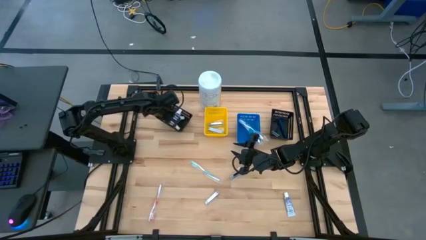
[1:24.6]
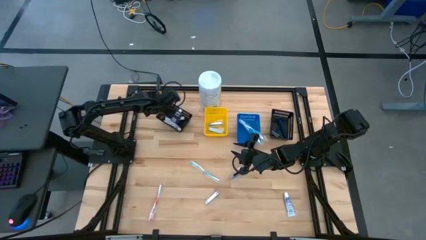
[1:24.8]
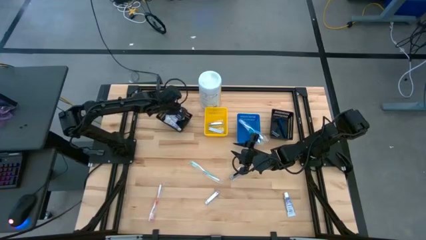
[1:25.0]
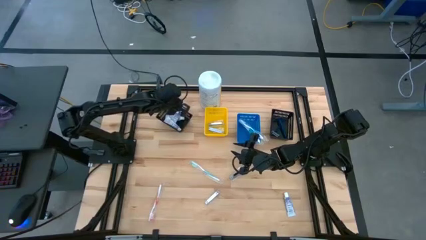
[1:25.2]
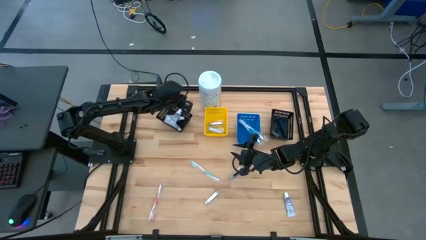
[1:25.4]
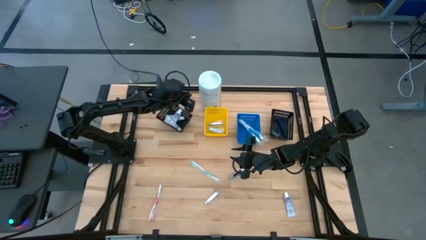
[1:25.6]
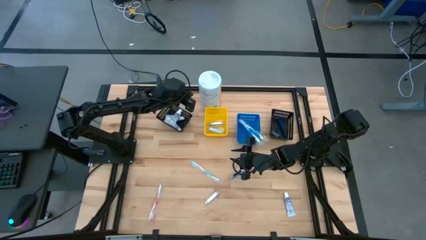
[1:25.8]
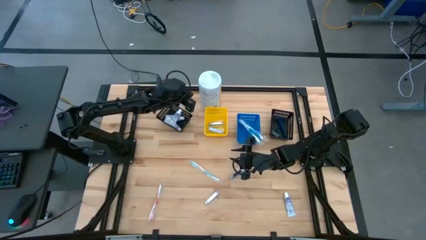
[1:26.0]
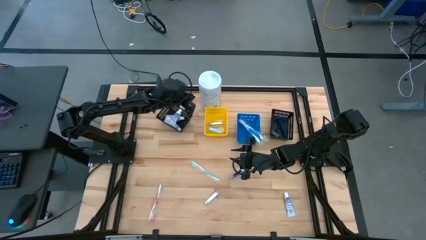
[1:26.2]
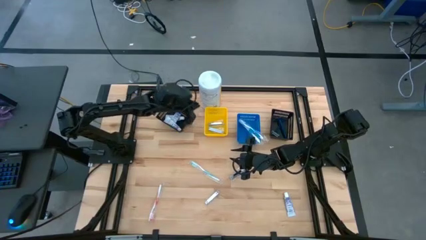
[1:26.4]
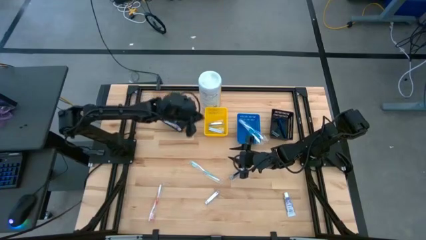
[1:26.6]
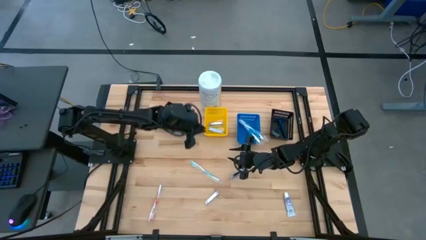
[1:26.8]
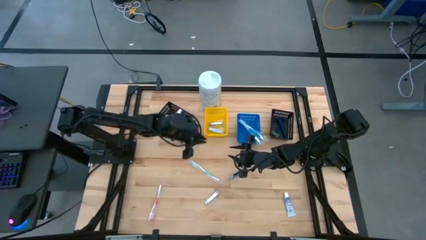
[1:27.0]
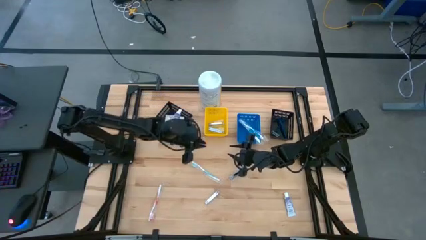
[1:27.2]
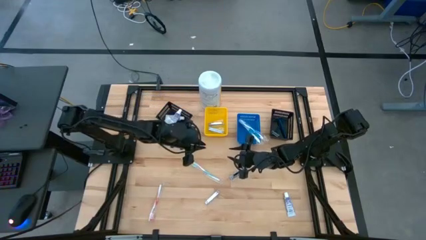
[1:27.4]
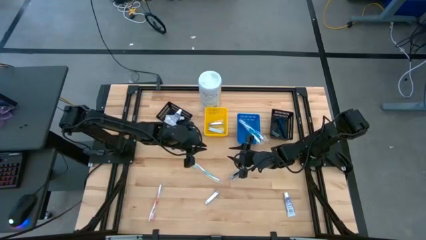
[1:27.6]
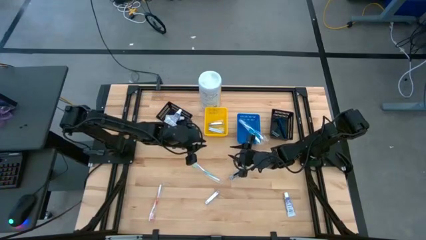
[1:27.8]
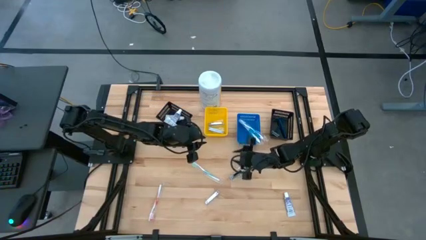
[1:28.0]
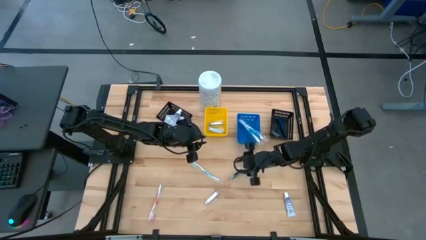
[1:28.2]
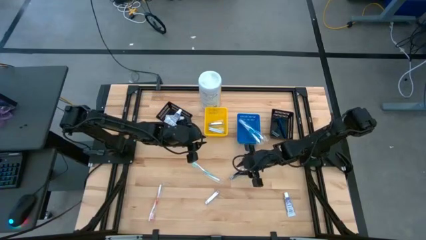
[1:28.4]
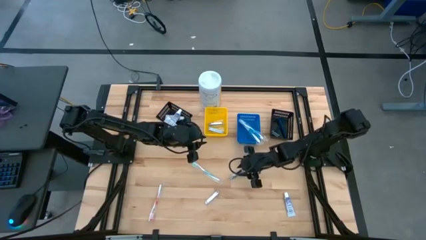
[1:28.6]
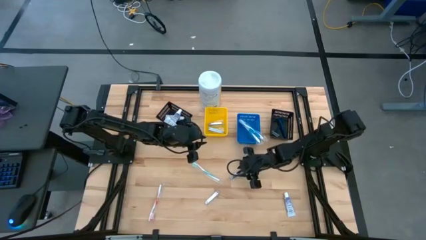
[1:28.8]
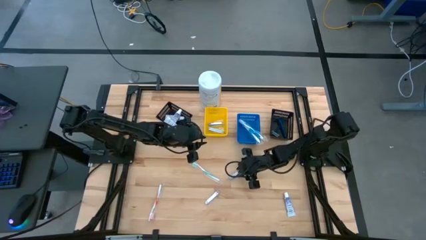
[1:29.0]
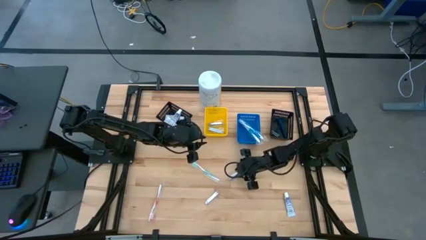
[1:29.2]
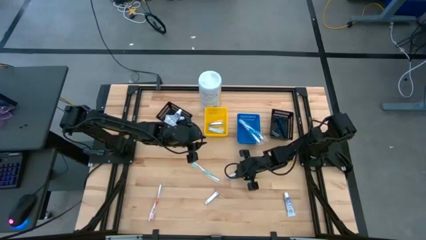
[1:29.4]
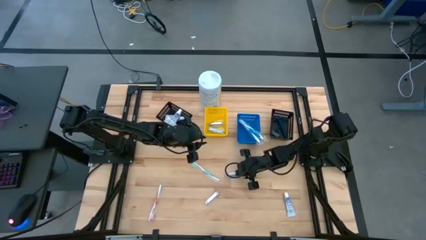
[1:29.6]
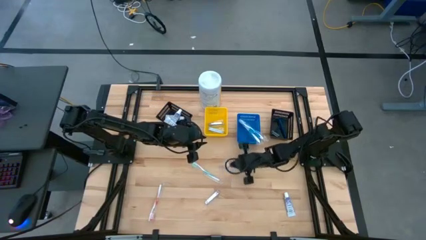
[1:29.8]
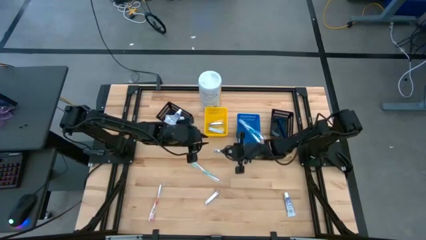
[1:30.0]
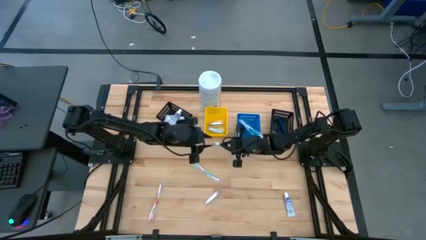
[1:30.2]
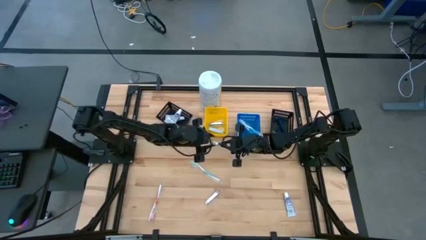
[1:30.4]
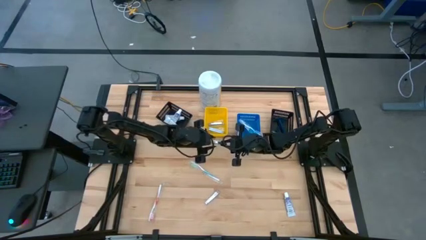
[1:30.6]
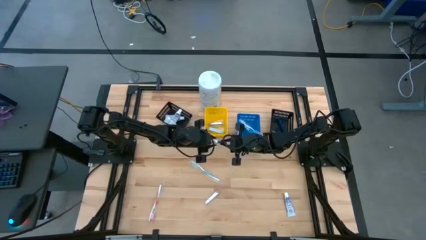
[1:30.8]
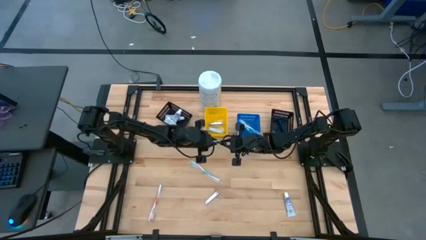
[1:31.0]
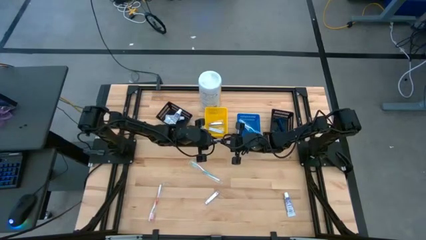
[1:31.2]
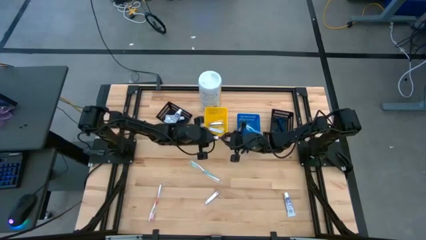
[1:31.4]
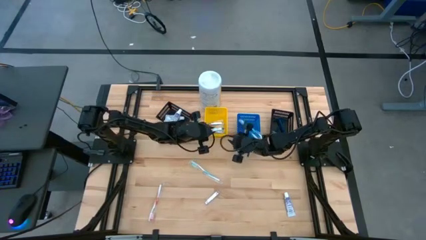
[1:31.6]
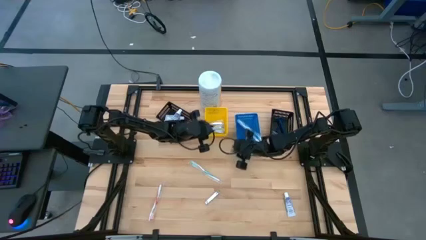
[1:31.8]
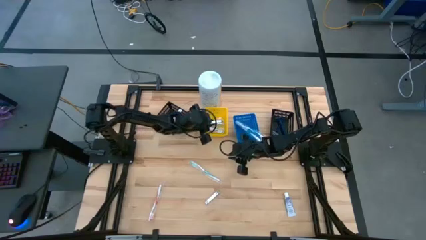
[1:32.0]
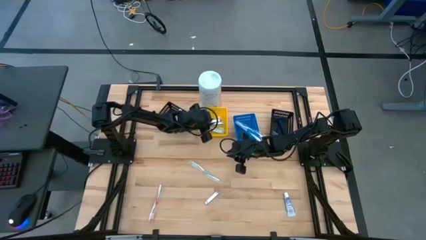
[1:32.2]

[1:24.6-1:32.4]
Task: Pick & Place Travel size toiletries
Put the silver nail cutter into the yellow bin

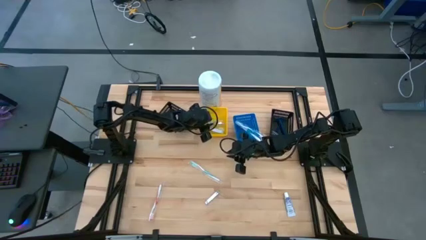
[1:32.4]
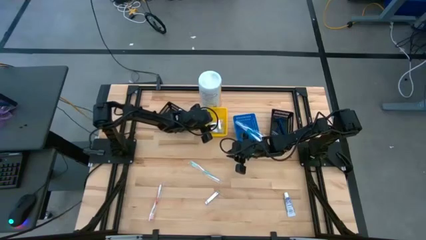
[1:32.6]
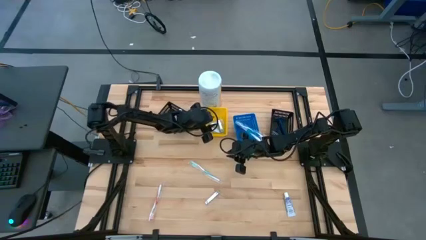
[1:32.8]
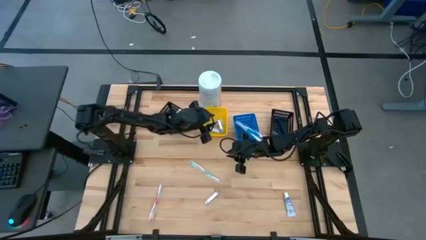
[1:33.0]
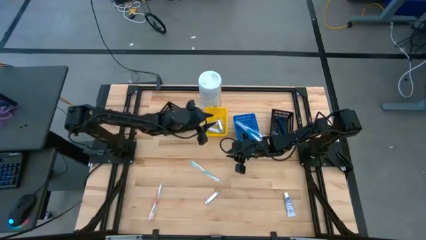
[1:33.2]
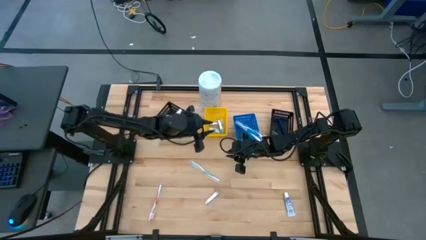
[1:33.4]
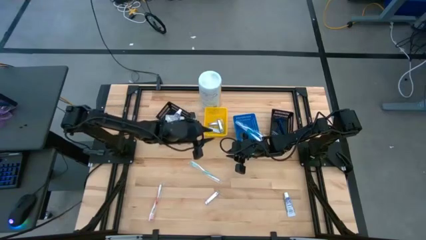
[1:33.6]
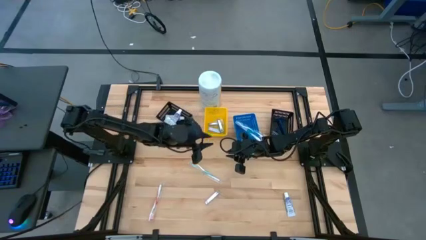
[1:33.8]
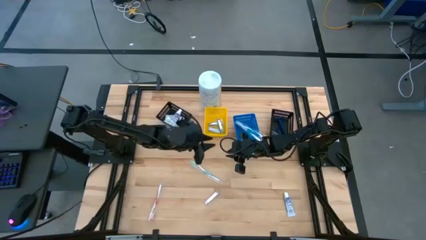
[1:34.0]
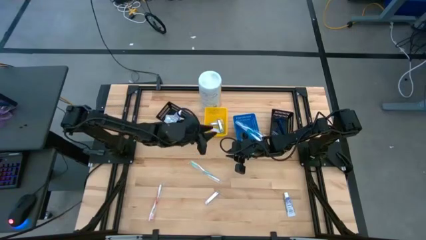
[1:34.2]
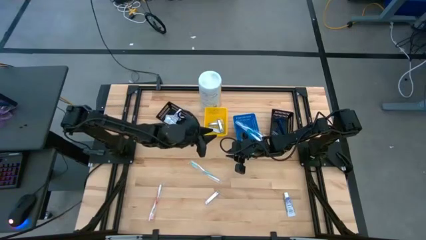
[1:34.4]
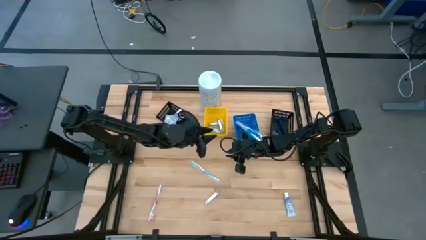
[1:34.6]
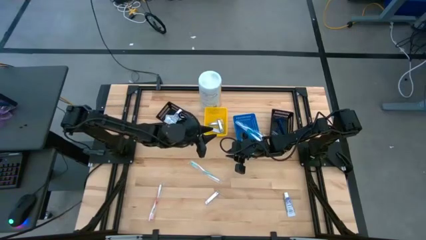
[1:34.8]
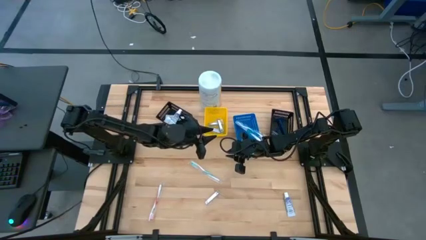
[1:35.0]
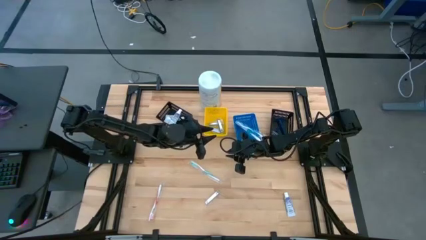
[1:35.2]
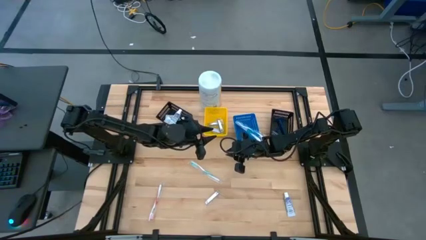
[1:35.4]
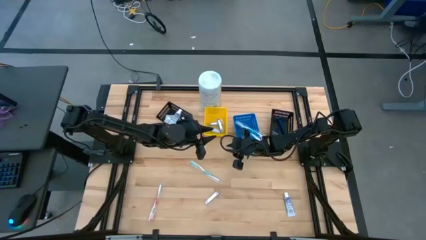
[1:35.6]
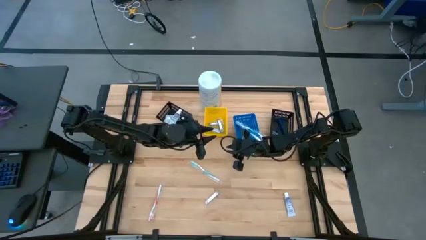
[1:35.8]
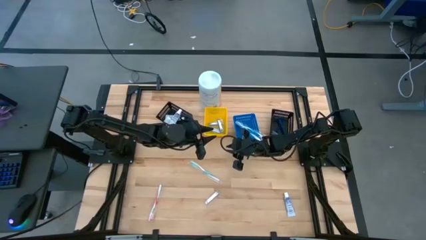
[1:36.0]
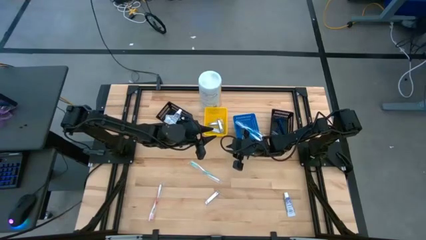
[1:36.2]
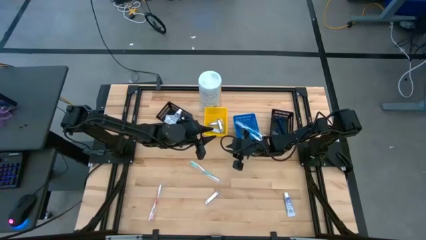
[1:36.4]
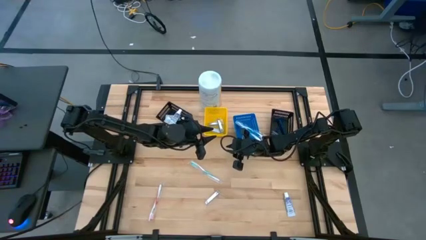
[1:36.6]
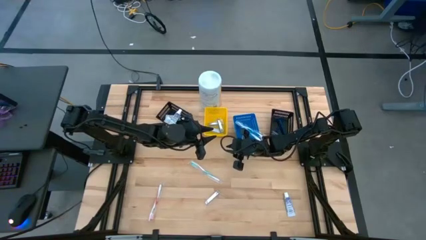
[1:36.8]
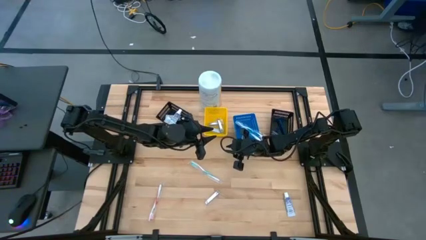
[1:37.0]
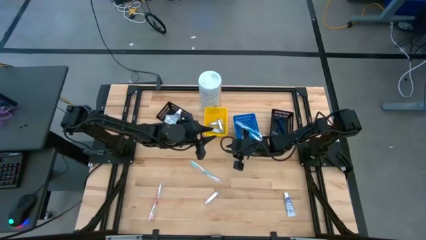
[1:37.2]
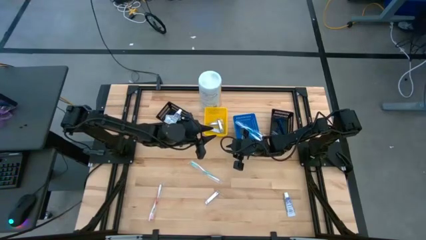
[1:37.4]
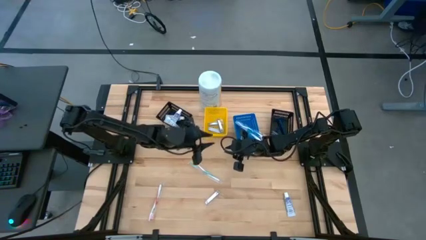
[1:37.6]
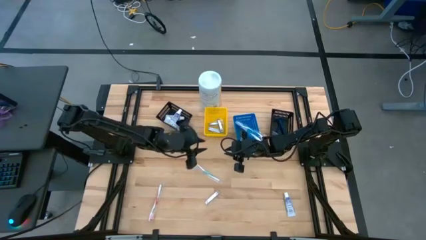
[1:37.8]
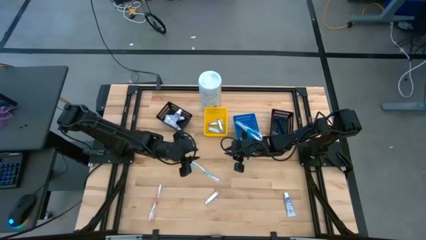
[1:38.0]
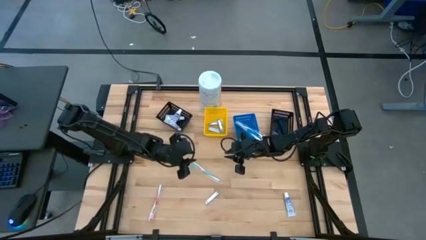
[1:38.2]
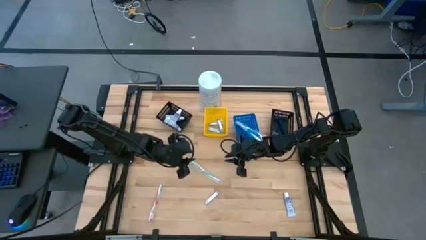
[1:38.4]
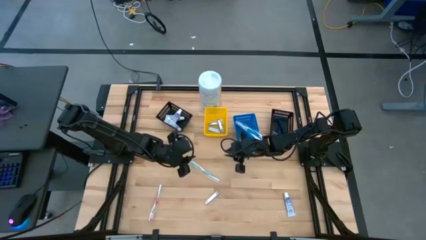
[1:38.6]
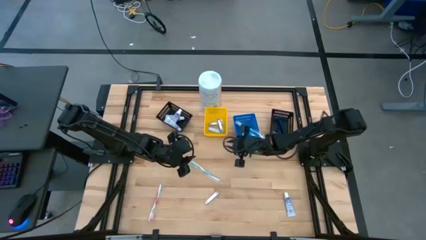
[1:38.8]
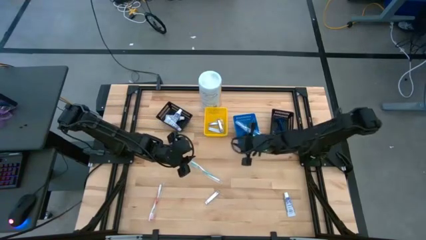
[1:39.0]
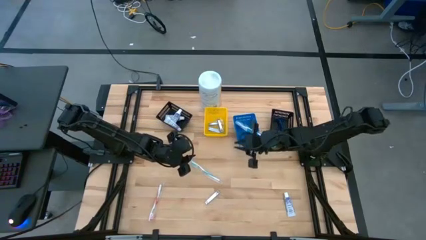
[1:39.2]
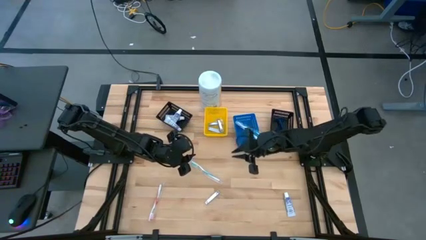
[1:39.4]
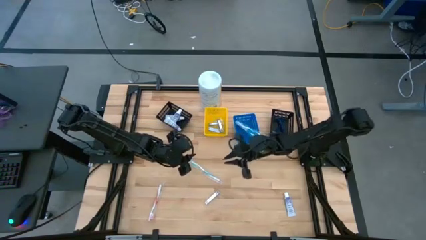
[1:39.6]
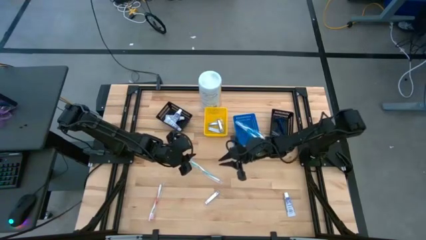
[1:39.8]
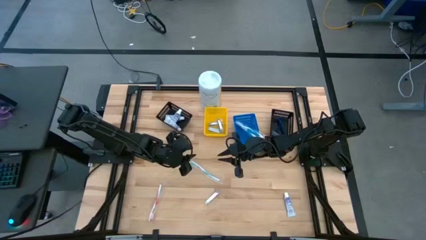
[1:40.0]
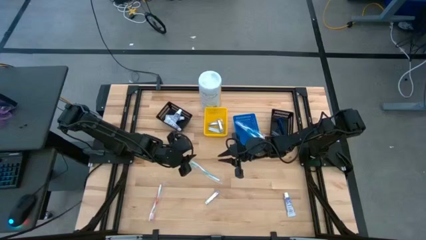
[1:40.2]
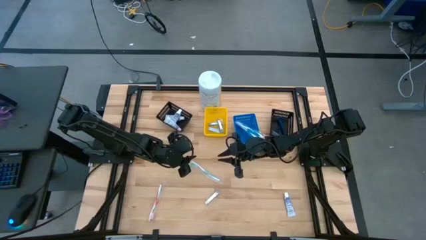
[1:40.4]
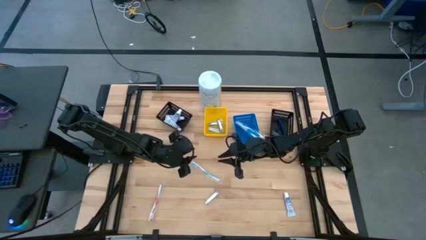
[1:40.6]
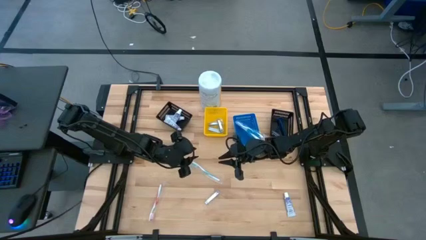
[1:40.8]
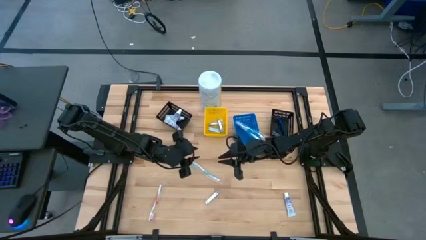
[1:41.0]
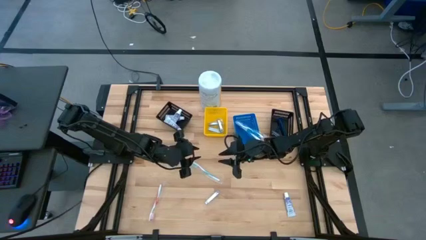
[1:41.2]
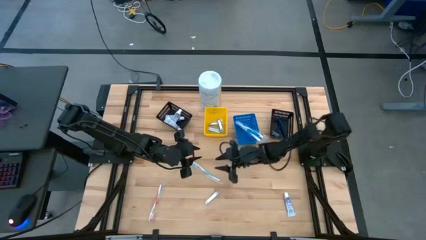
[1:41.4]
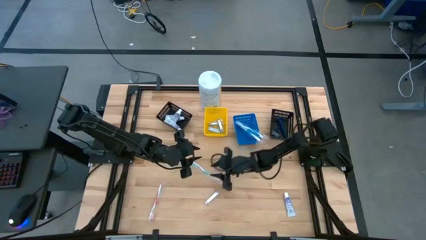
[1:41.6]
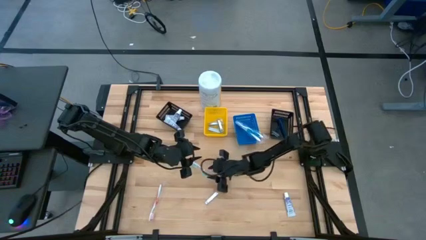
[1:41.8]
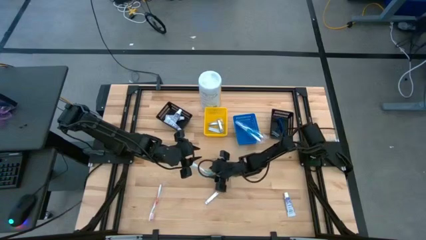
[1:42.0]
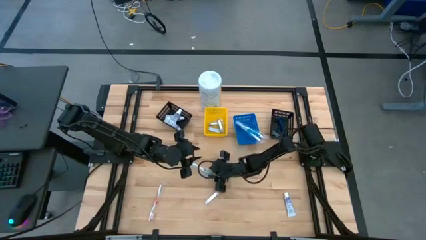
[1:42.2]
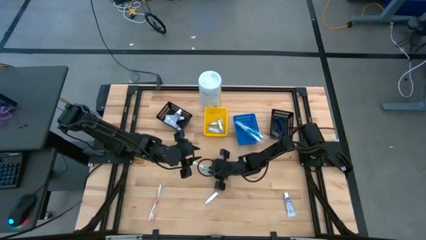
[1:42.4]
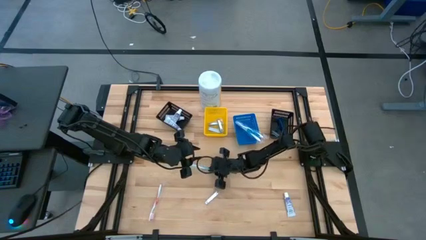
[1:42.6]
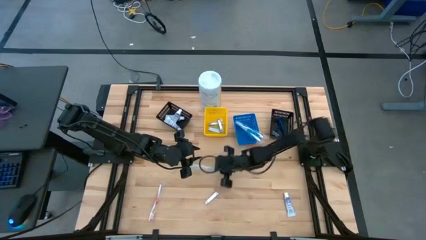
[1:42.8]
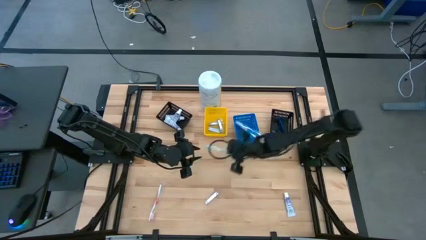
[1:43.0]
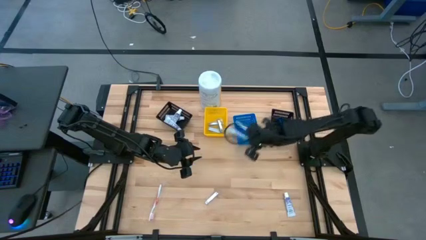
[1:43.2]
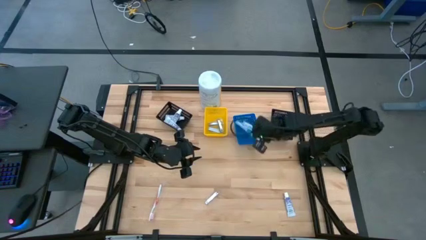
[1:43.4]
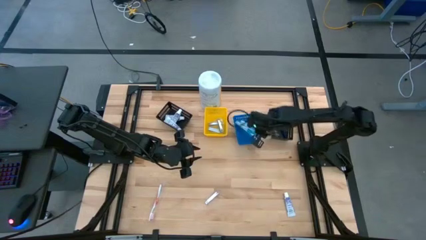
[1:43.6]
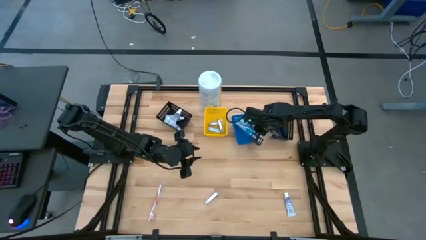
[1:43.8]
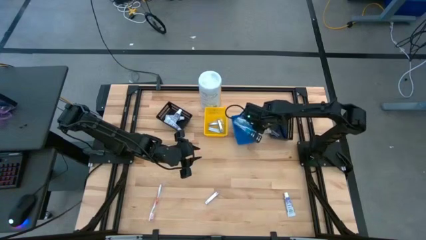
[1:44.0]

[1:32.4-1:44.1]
Put the green toothbrush into the blue bin
